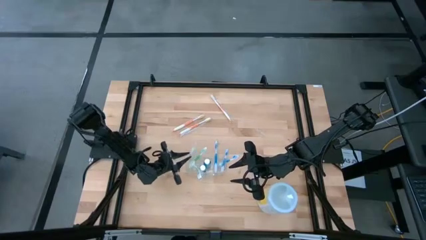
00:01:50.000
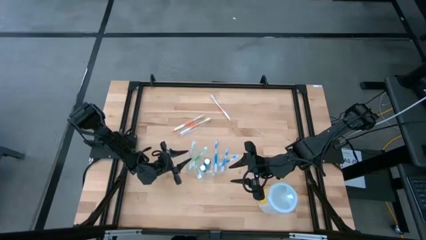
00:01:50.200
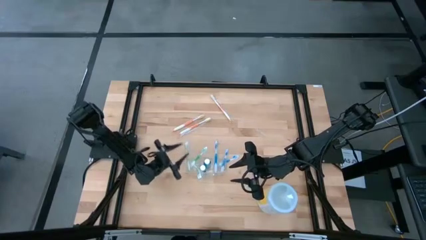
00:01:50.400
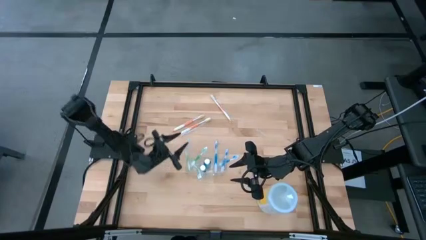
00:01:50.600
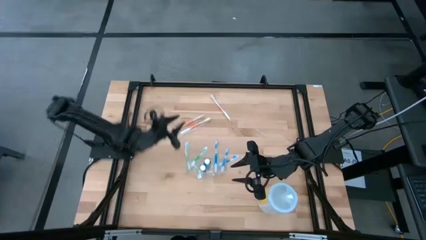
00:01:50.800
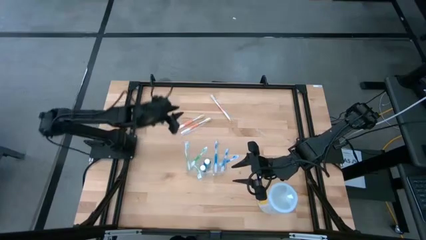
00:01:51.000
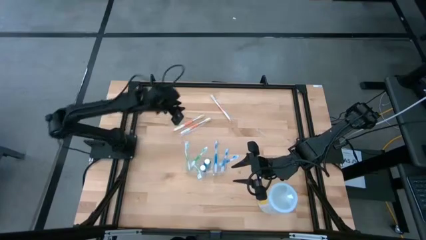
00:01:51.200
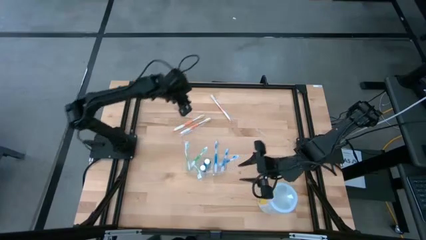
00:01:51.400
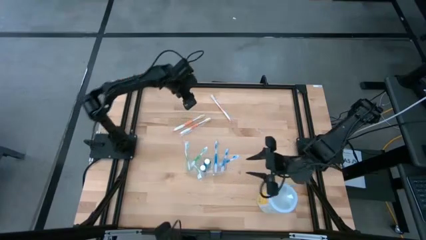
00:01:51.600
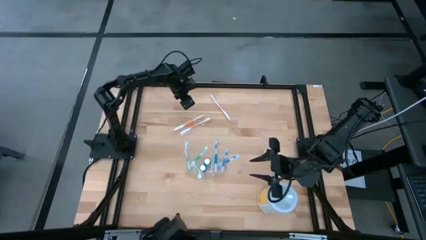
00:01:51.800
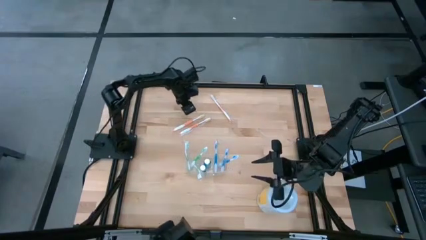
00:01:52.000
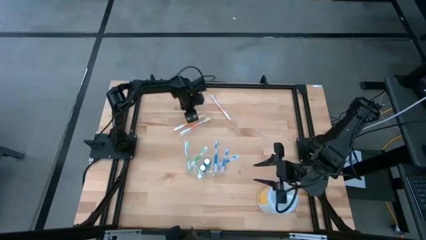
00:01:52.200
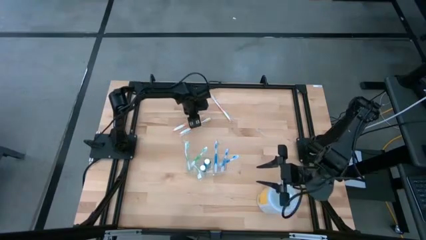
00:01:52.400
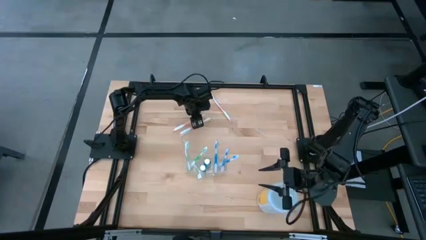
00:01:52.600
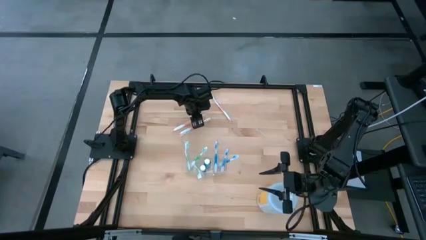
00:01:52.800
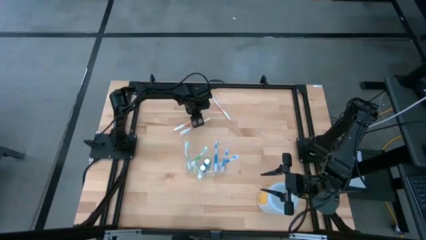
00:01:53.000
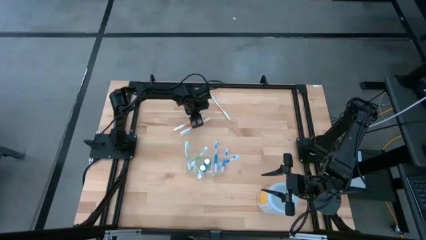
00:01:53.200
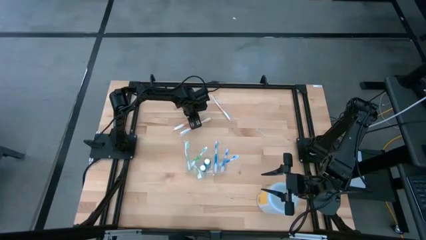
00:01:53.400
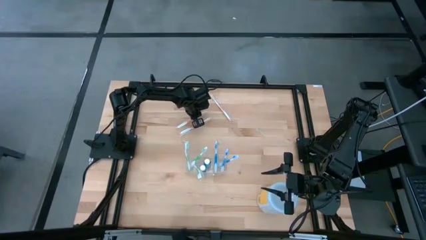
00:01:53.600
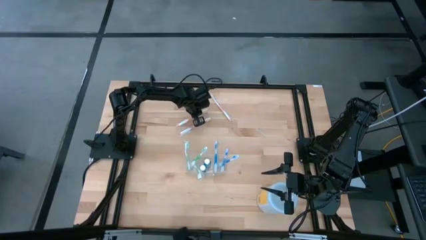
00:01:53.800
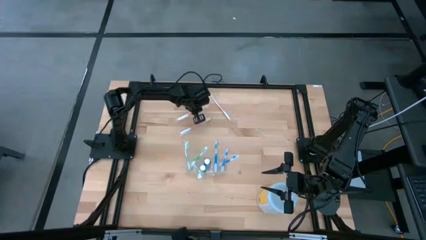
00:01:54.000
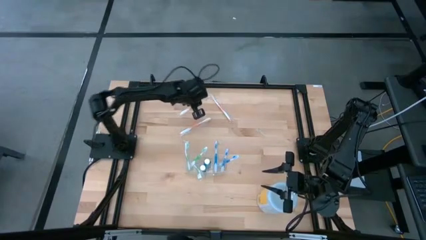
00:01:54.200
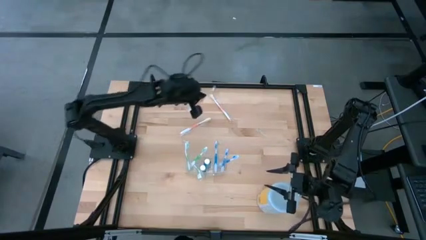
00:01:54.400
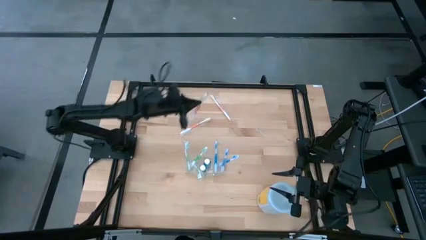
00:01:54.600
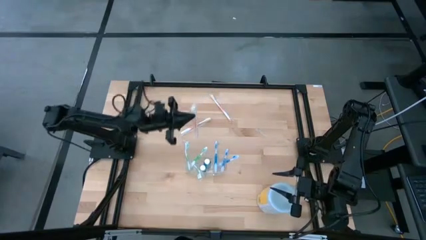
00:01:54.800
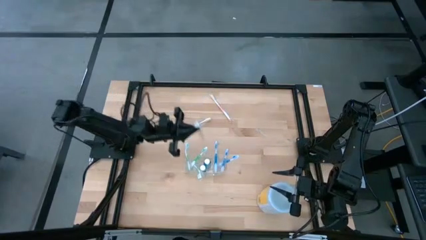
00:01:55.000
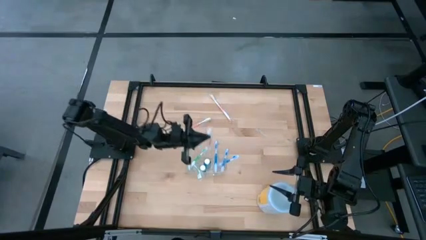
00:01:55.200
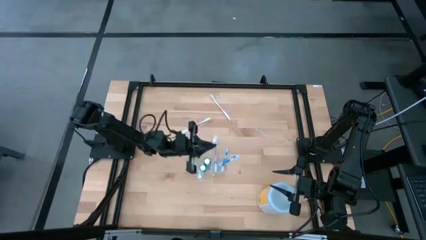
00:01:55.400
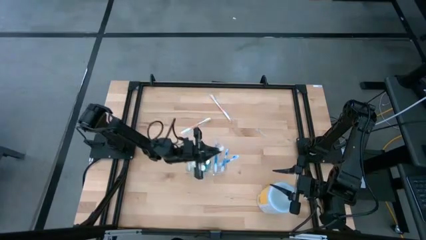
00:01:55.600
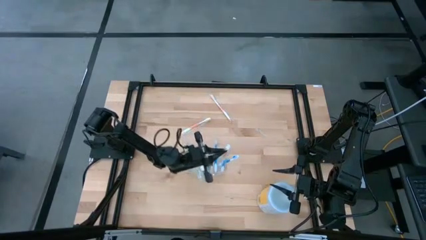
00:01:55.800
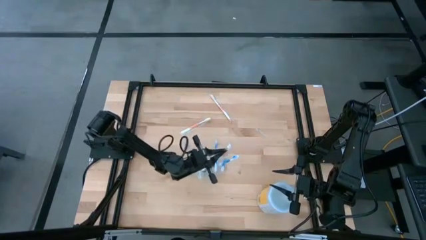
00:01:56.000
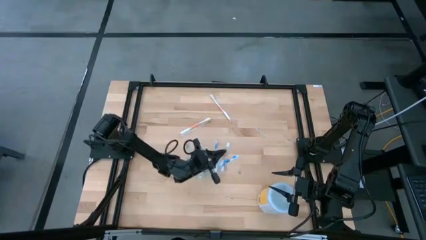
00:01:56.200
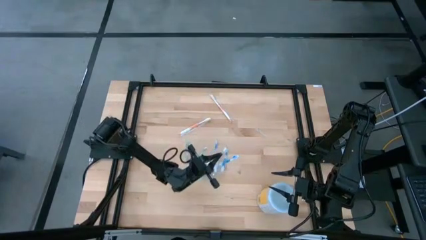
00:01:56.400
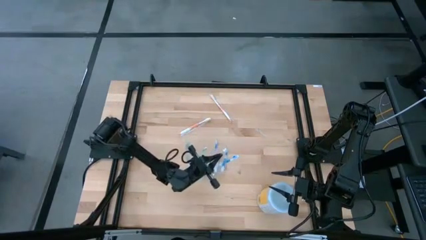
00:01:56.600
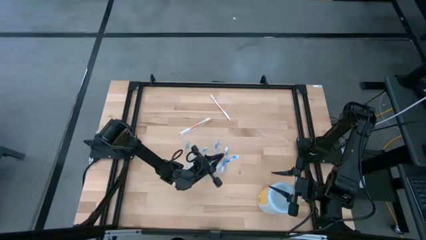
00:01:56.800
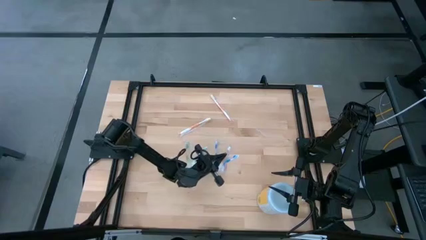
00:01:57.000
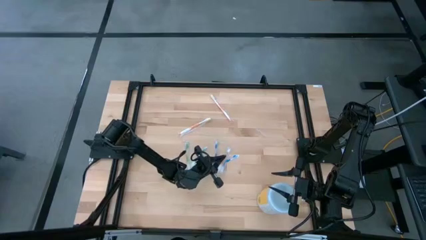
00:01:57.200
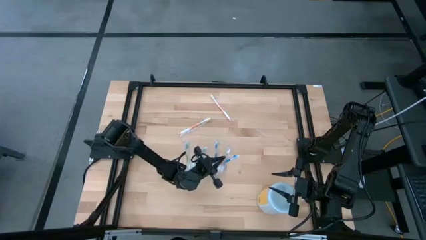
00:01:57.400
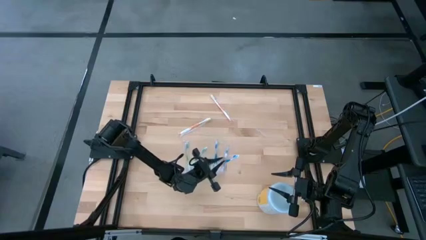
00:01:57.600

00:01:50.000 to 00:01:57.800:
Task: Pick & Place toothbrushing station
Put the orange toothbrush into the transparent organizer

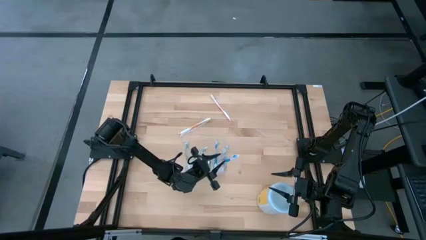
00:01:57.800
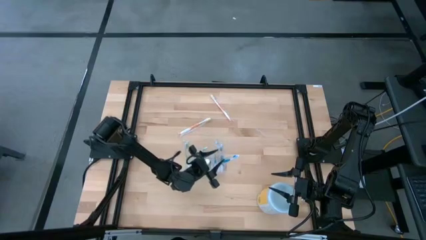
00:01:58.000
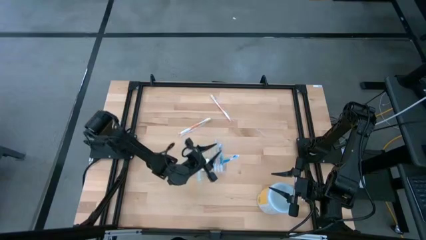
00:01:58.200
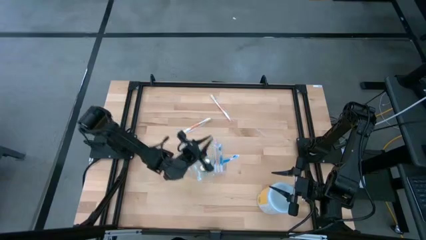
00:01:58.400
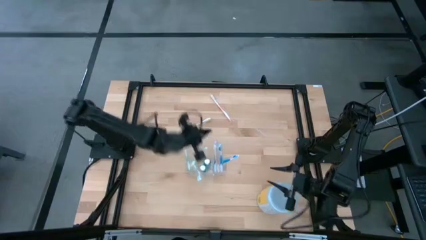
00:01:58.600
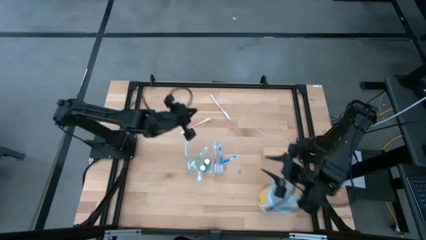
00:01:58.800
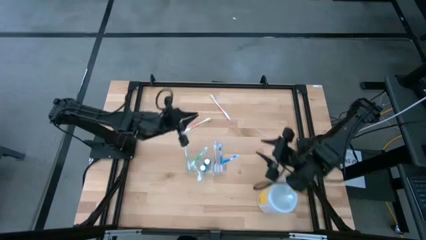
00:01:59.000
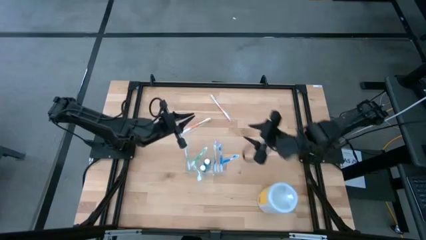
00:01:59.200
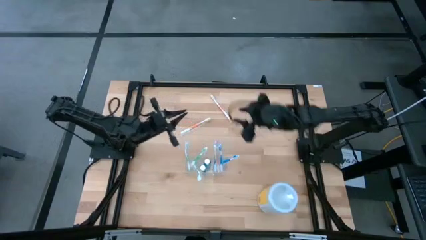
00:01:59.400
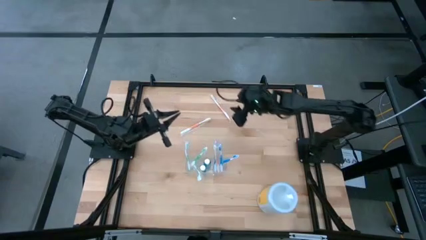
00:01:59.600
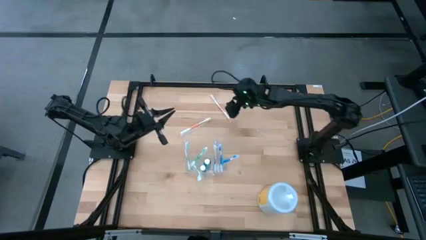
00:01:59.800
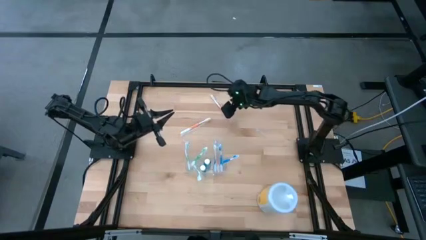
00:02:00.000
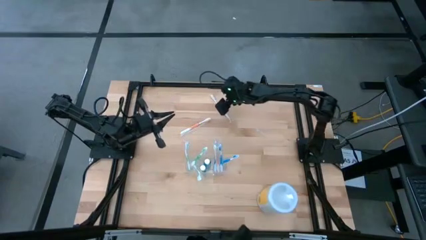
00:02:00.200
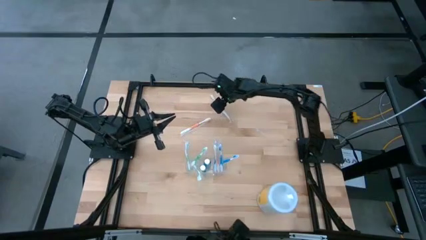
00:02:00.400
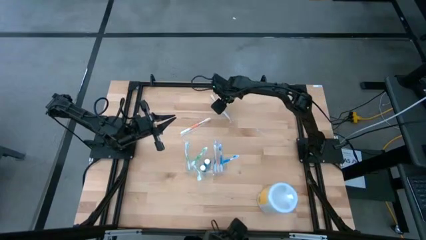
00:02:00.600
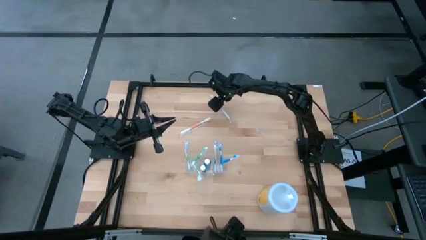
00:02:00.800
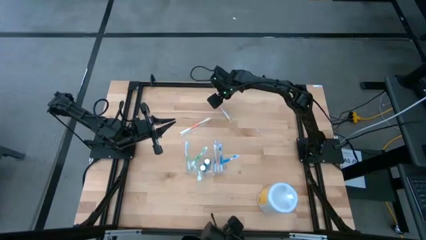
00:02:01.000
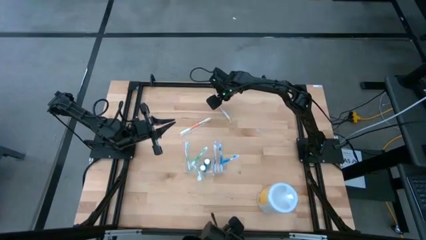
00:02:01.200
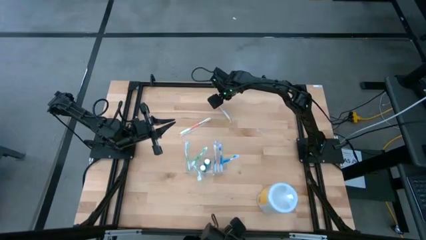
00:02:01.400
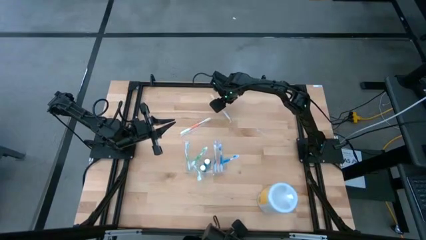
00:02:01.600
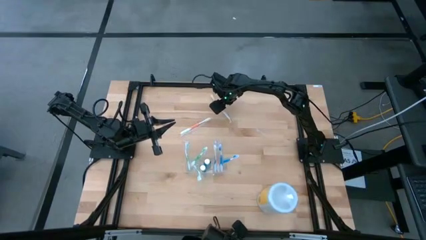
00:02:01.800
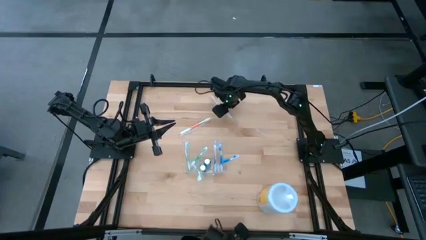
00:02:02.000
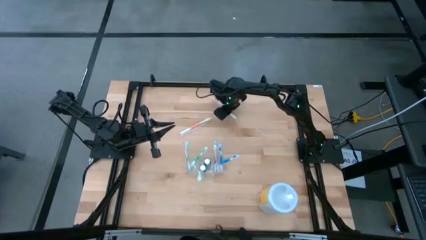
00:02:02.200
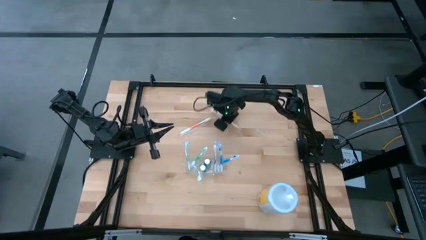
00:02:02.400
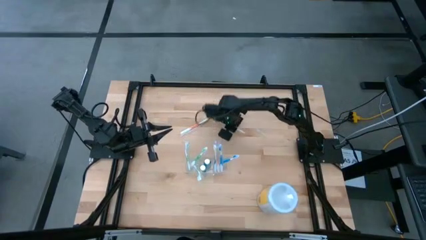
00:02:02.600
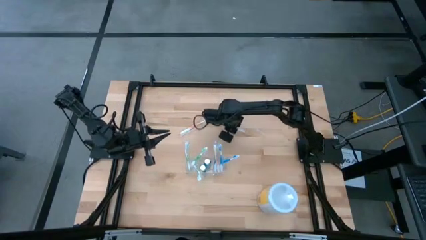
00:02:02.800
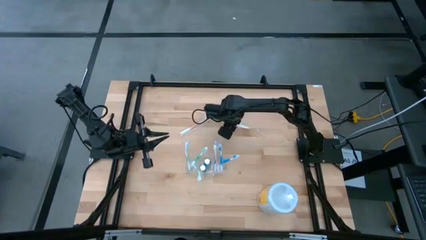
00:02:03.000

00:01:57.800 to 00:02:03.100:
Put the orange toothbrush into the transparent organizer

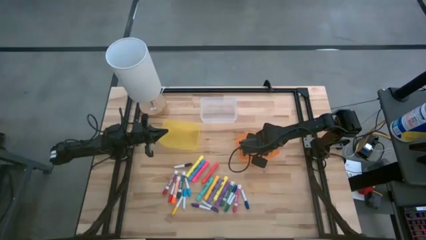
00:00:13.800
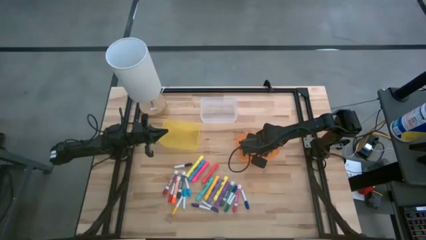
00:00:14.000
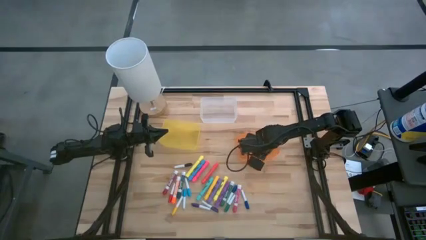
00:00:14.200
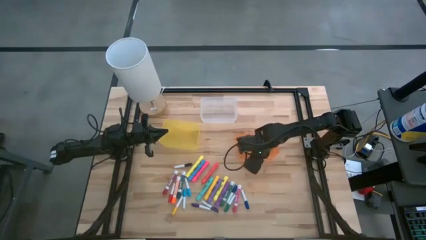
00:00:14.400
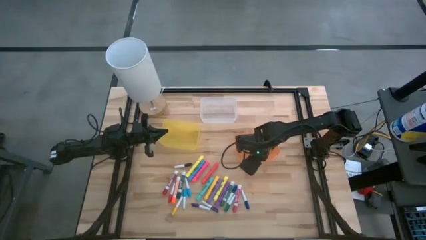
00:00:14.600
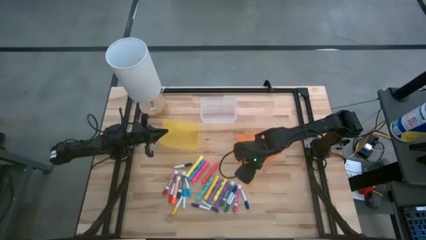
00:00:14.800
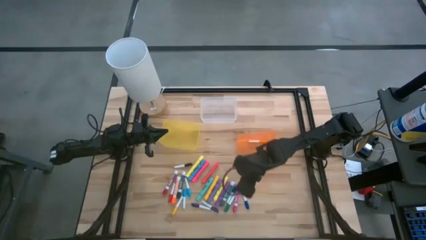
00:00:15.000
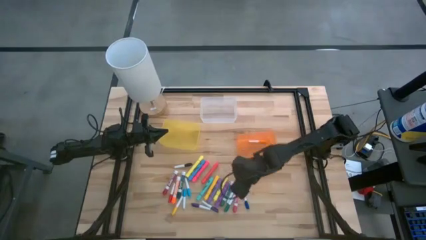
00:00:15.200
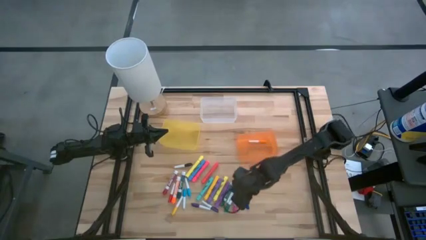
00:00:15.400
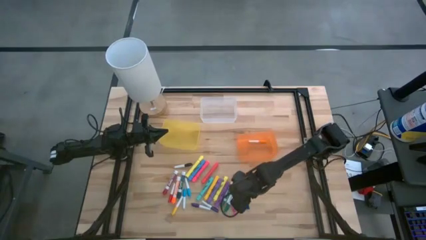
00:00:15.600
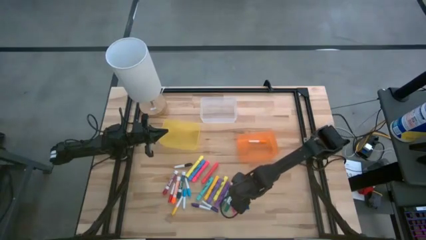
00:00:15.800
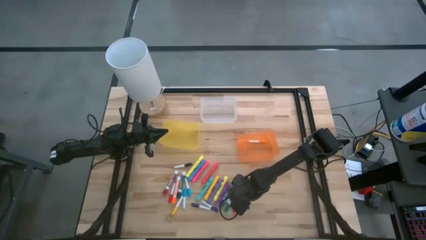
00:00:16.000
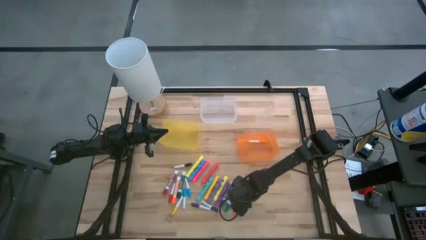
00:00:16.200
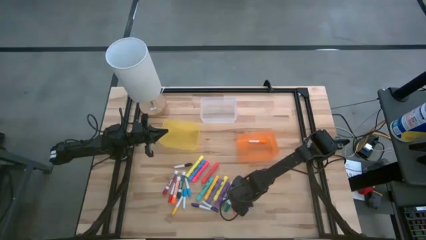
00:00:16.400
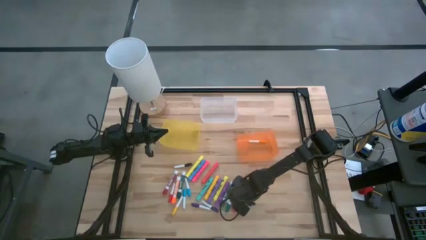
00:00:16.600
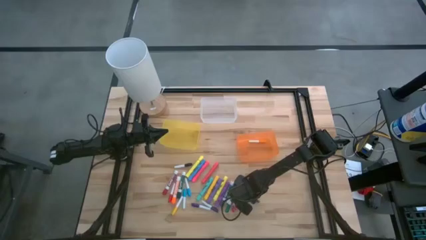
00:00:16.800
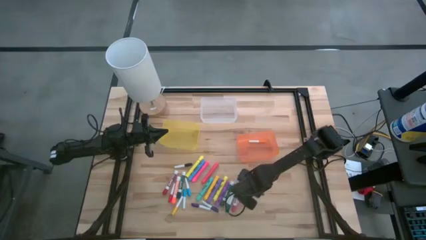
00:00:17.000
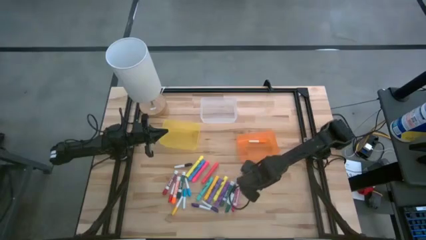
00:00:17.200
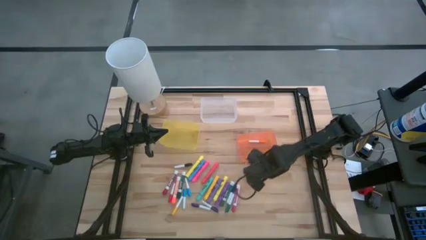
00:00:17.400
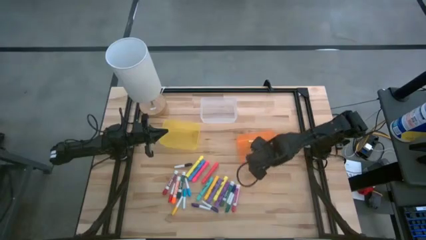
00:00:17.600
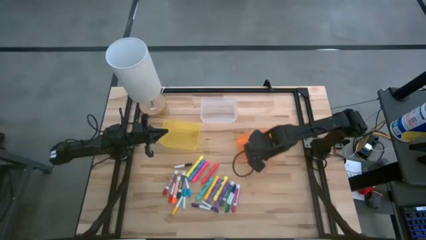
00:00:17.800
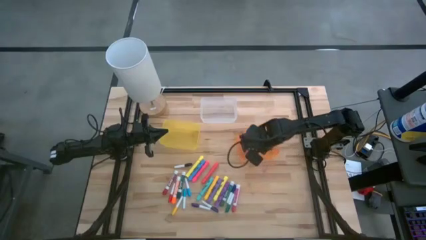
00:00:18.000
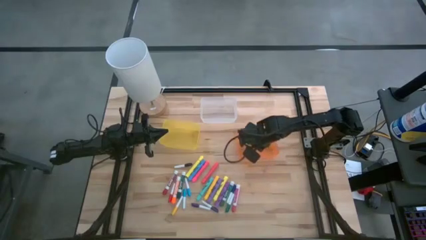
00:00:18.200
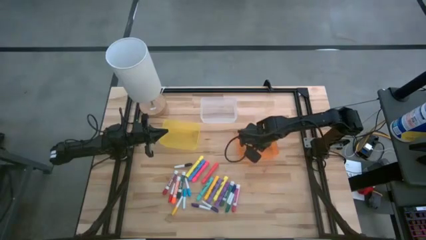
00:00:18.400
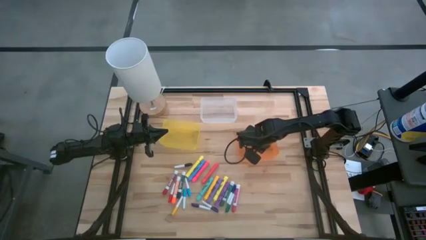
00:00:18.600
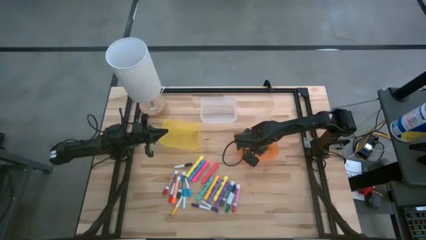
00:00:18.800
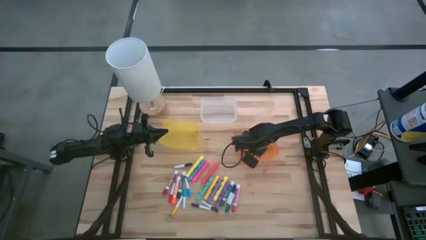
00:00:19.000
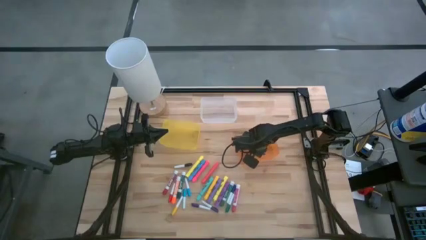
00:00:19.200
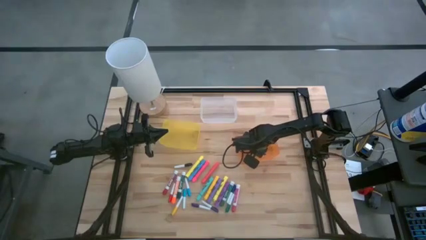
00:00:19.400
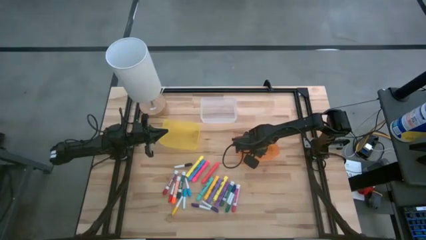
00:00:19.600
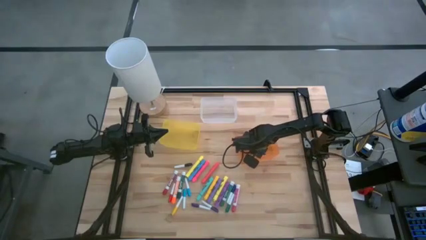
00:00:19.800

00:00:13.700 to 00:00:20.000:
Task: Pick & Place Markers
Put the bottom small blue highlighter pen into the orange bin
